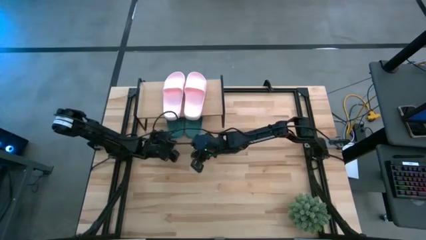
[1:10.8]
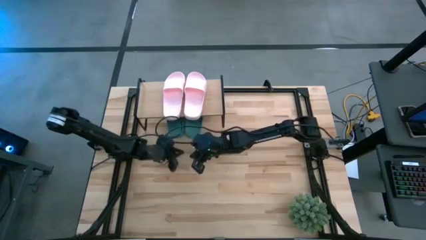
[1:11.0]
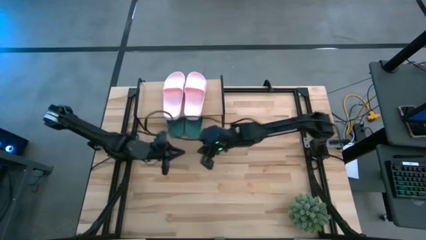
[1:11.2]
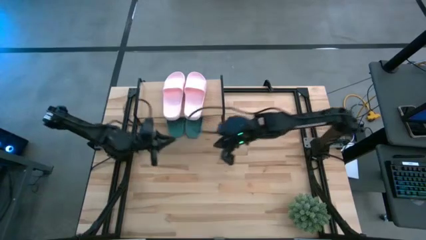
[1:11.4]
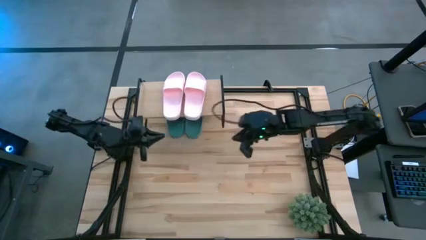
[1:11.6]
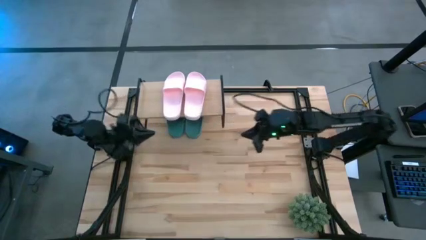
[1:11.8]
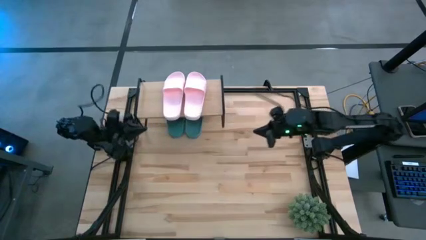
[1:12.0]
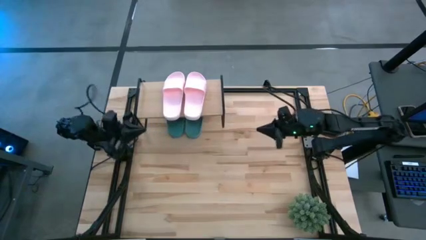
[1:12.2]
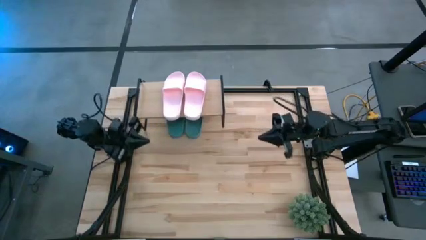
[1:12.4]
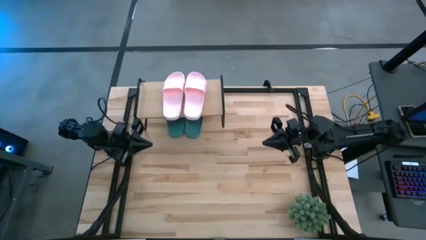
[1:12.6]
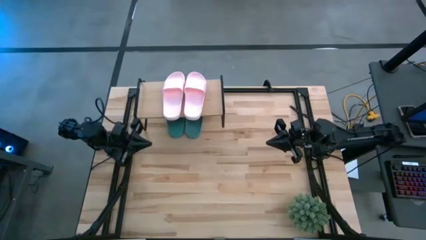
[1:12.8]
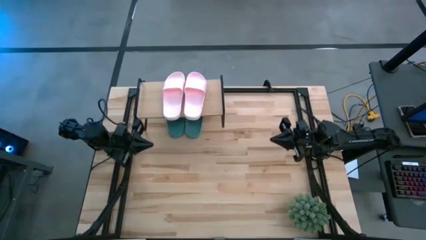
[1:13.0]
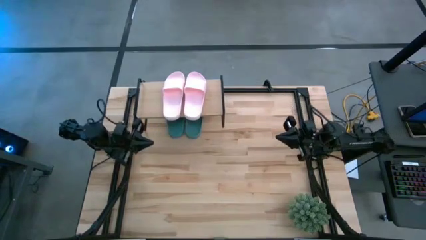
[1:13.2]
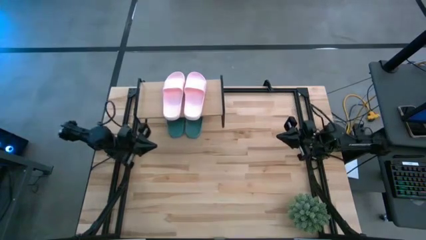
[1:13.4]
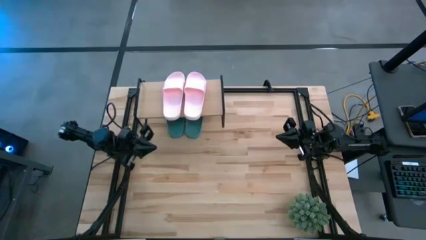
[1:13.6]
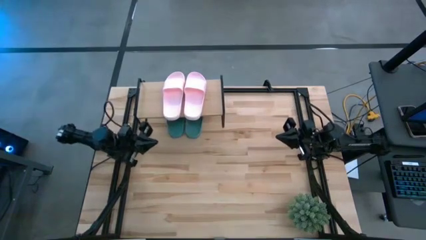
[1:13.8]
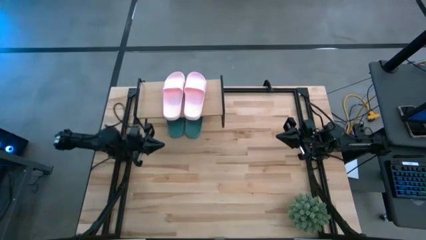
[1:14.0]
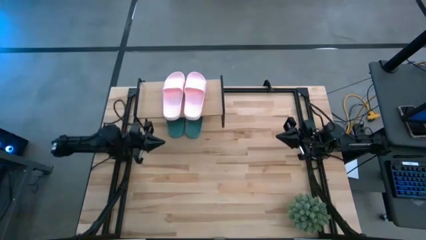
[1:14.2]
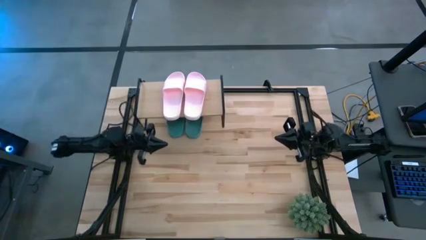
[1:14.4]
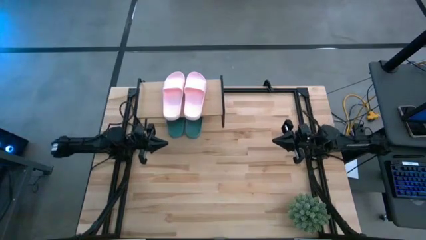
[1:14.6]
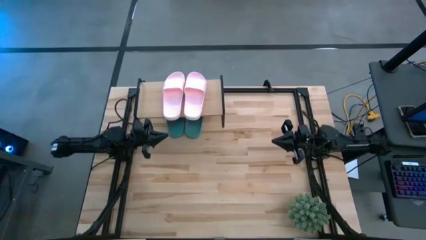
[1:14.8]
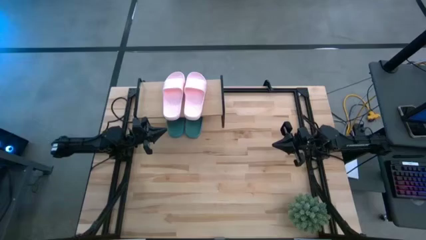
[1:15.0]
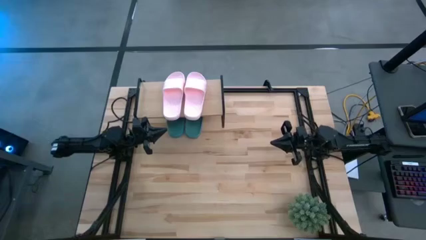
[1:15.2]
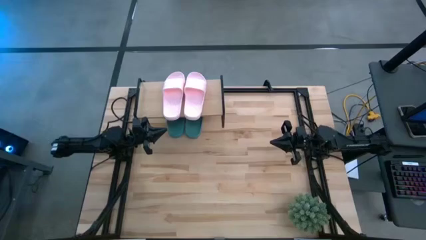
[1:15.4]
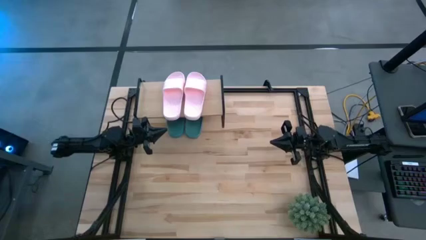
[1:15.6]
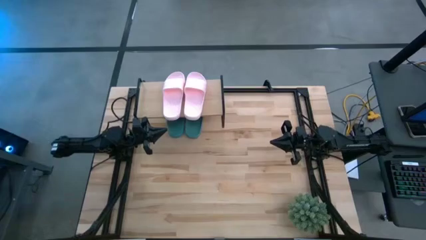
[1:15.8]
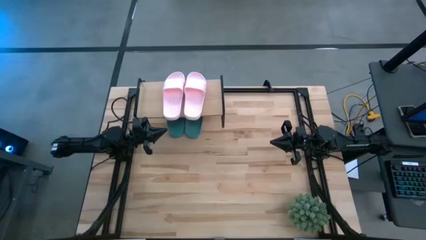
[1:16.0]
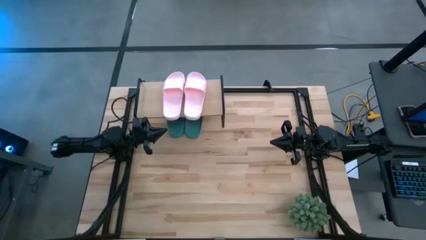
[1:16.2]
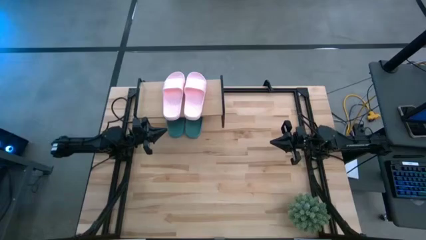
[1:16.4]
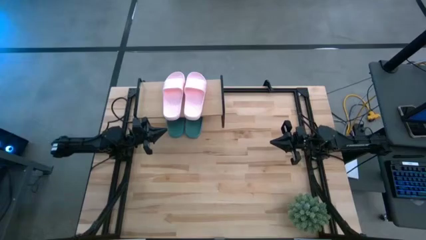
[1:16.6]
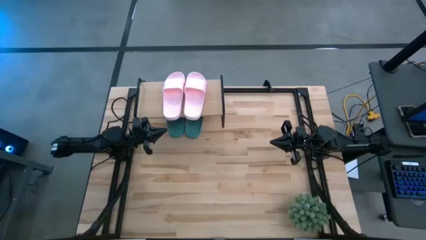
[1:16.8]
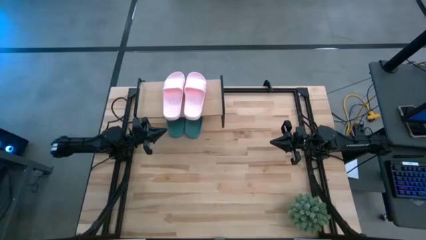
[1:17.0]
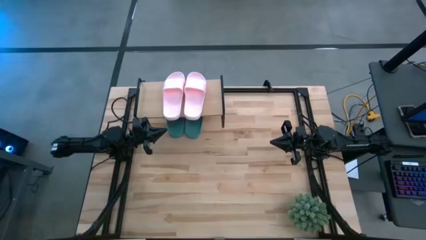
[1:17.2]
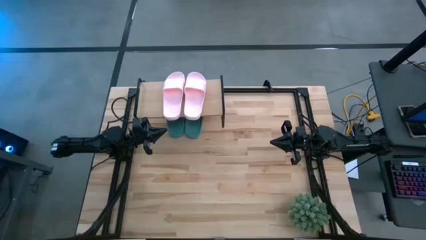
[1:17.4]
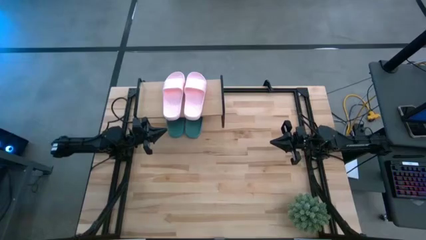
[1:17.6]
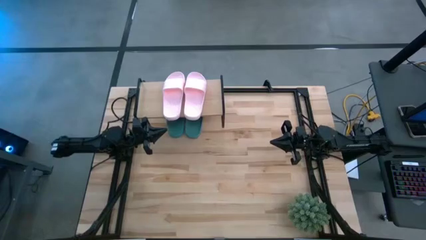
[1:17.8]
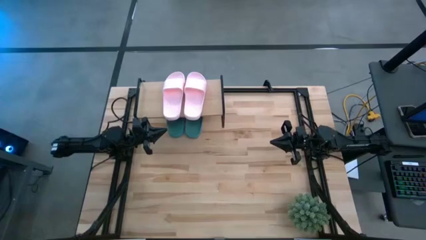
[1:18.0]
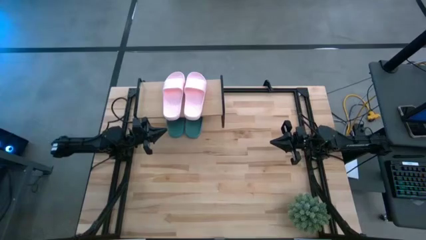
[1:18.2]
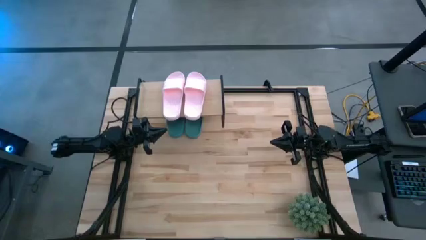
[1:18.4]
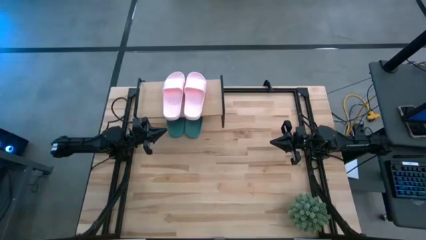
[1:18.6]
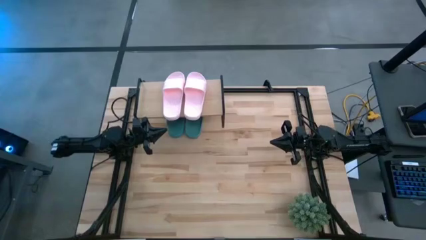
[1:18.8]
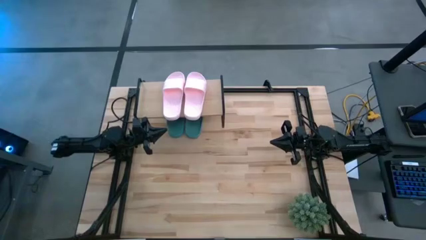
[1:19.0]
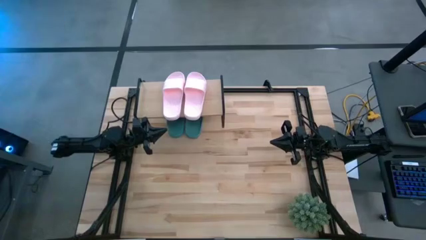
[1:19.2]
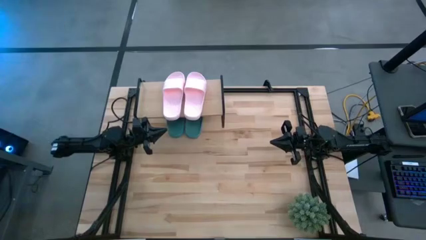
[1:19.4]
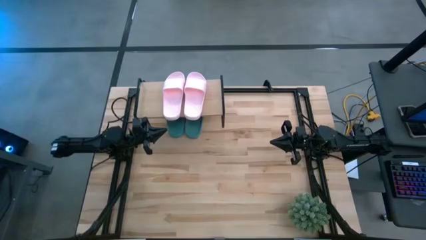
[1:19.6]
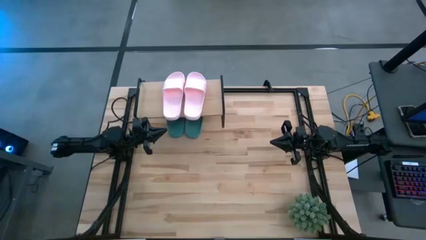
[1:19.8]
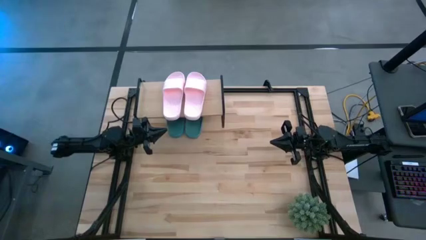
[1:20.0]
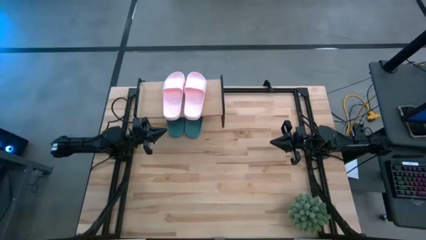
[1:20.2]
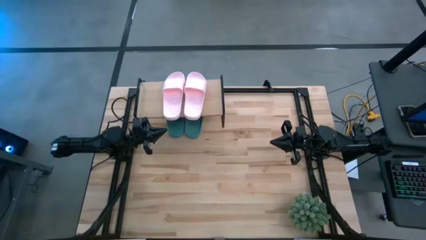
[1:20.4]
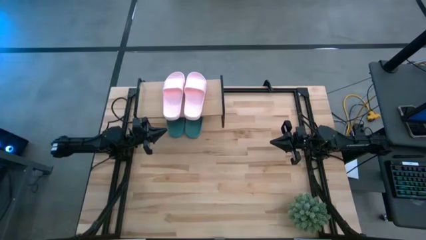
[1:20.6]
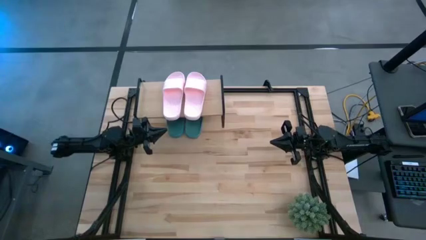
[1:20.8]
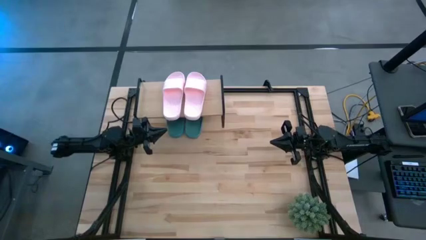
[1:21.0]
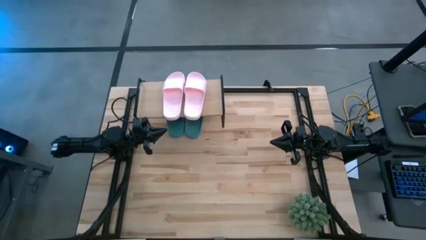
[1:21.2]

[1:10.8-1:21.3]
Task: Pick and place slides into the shelf
Return to Home Position

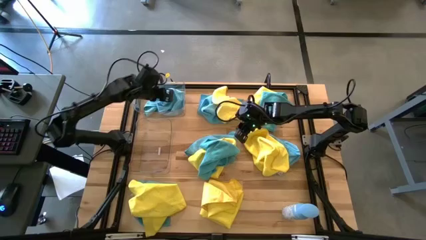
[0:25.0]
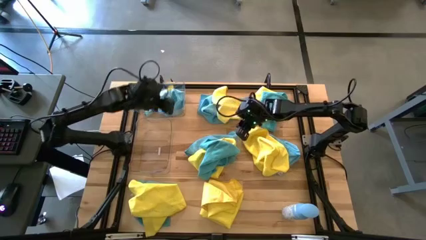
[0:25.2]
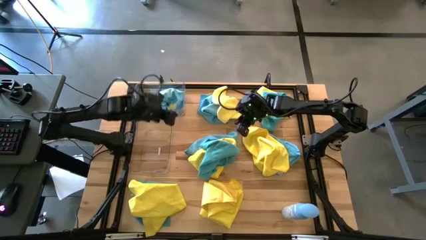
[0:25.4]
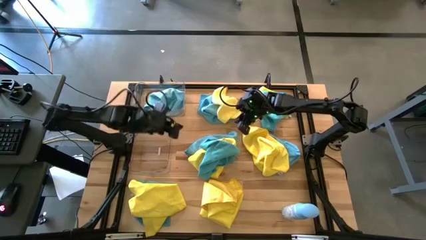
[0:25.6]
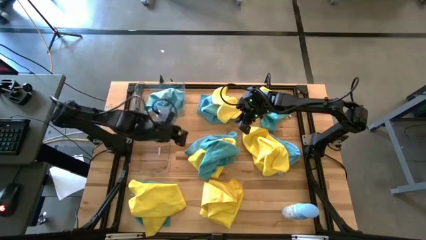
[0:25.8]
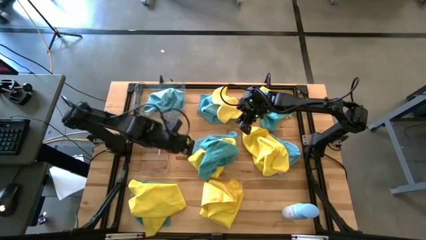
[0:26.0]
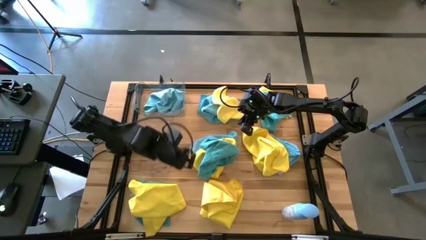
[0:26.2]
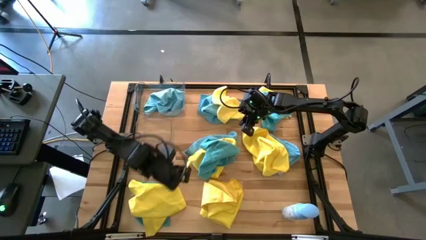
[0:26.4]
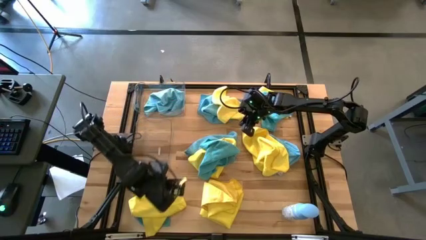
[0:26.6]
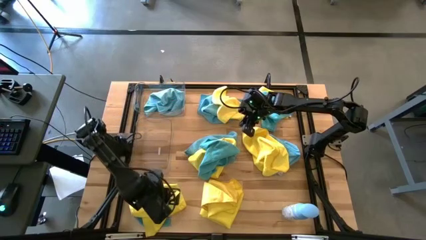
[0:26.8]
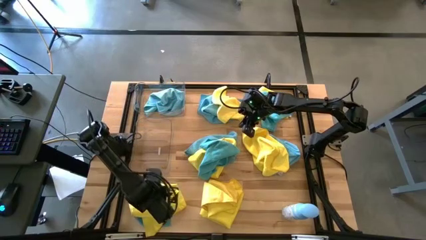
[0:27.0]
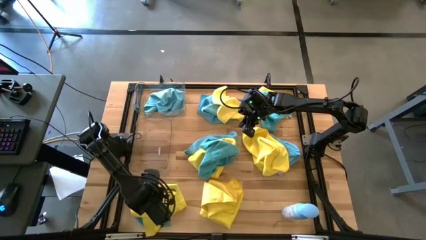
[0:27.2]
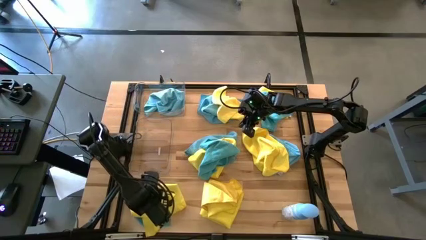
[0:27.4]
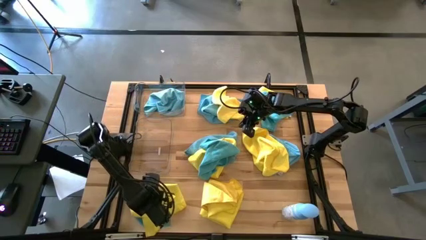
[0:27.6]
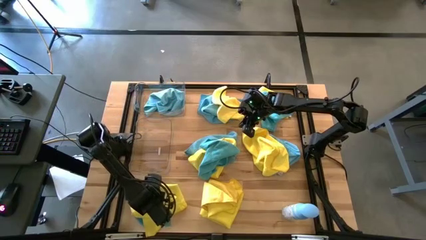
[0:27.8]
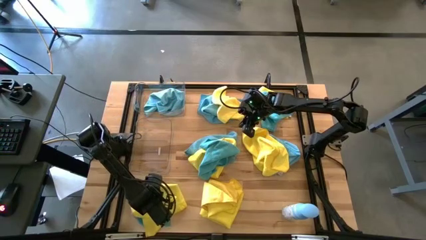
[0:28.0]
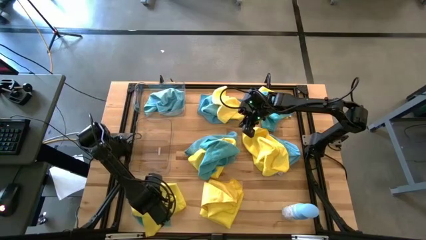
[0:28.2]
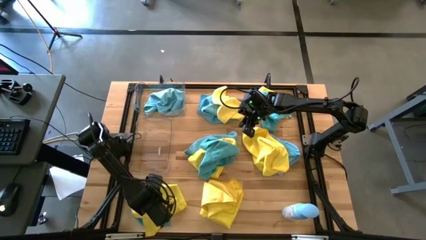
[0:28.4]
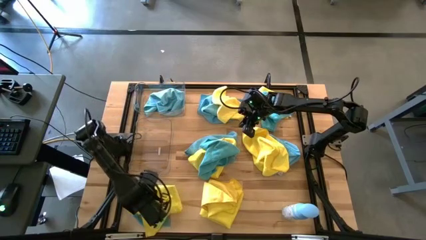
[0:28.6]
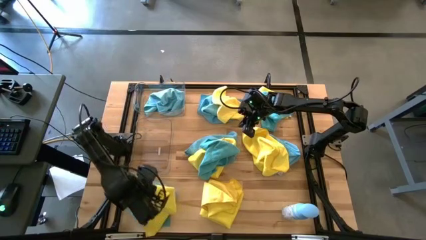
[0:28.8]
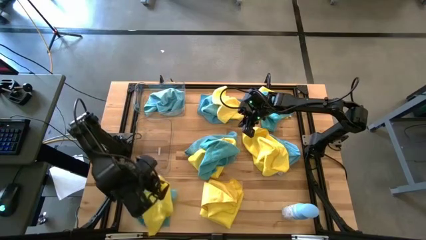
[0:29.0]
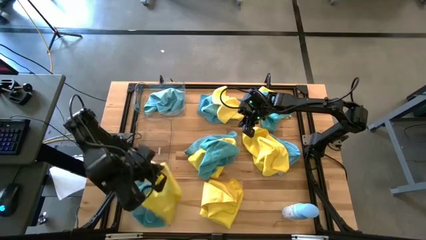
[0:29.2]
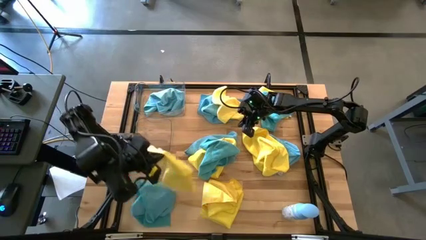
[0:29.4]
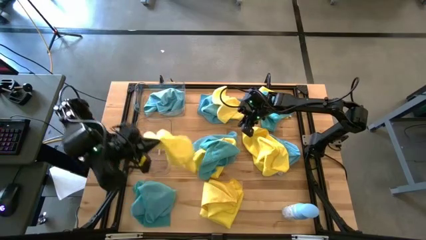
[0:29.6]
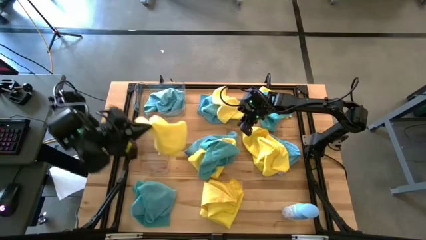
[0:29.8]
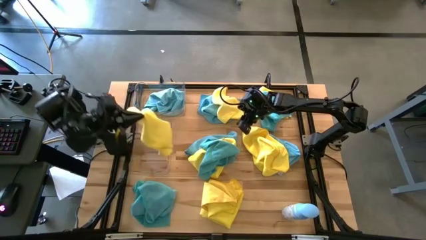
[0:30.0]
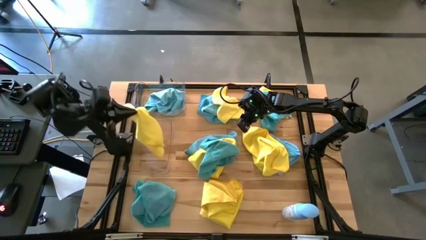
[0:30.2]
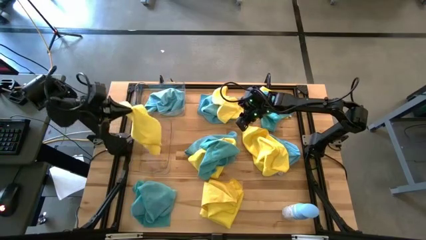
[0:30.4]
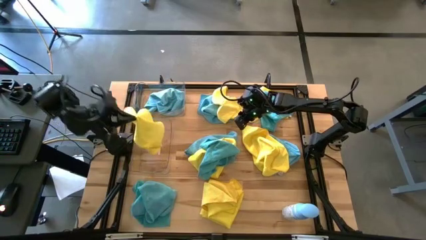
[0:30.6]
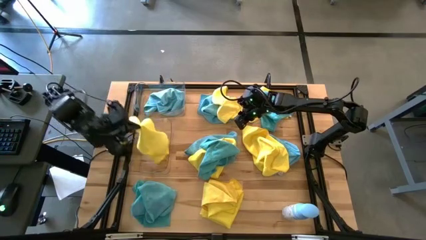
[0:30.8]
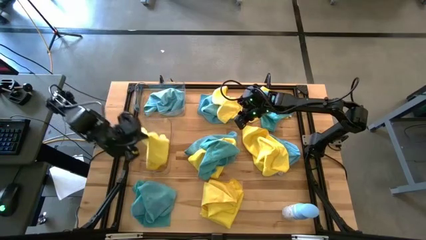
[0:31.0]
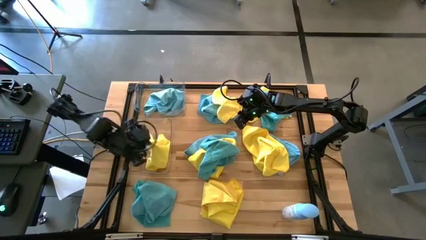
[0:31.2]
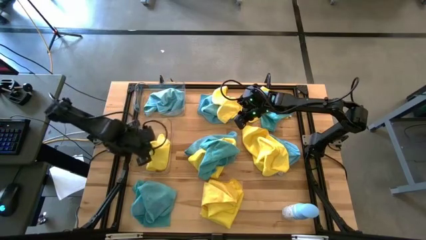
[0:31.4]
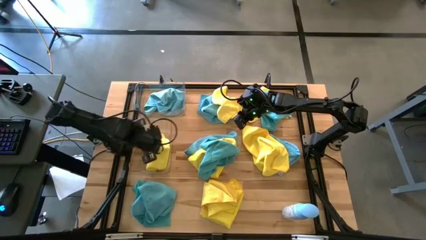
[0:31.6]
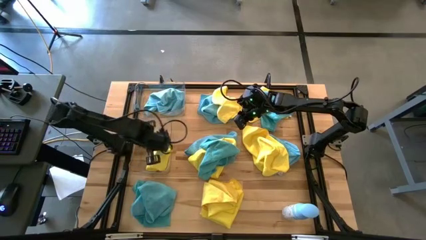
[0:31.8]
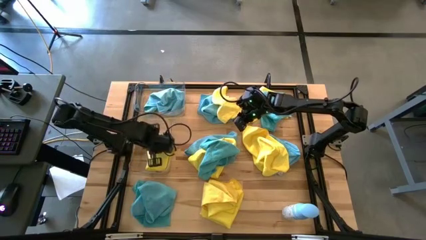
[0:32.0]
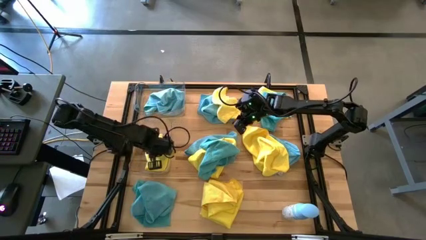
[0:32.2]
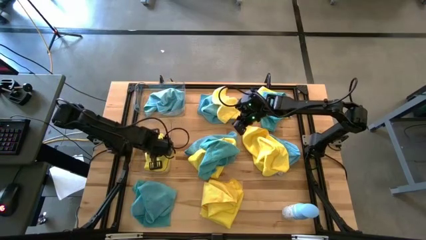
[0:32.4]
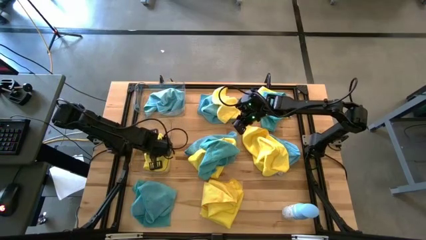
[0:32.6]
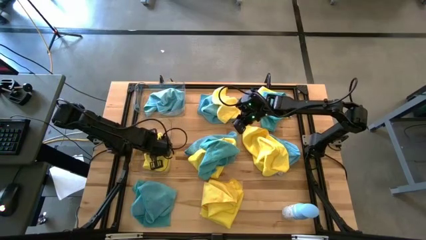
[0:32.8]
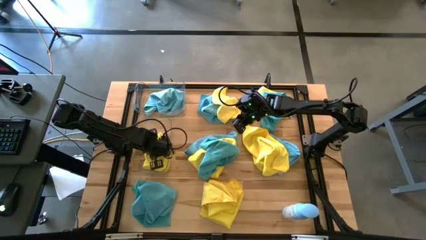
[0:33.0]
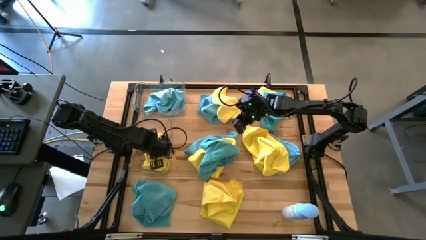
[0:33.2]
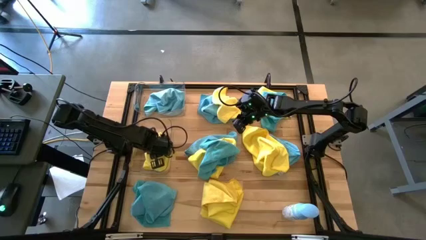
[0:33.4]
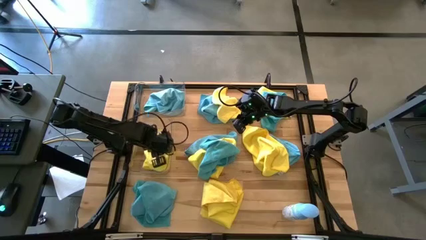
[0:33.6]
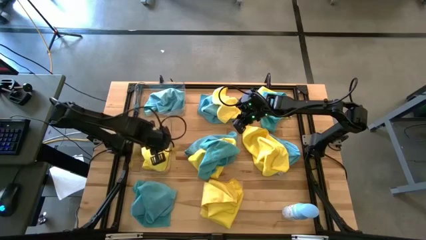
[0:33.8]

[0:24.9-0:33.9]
Task: Sort microfiber towel by color & place in baskets
Put the yellow microfiber cloth into the bottom transparent bin
